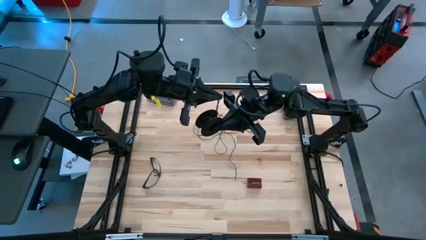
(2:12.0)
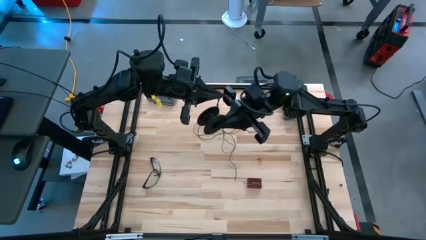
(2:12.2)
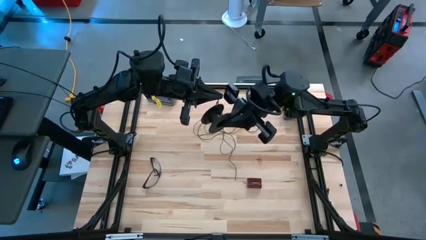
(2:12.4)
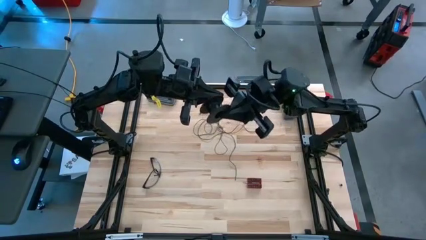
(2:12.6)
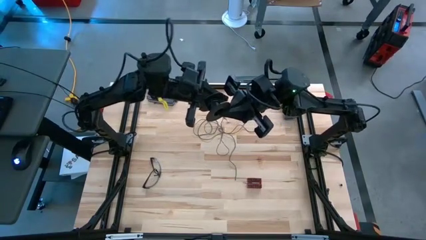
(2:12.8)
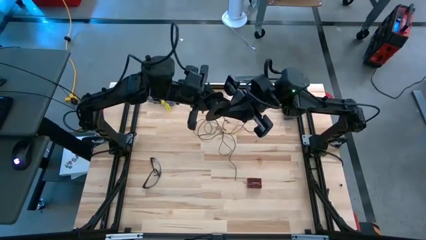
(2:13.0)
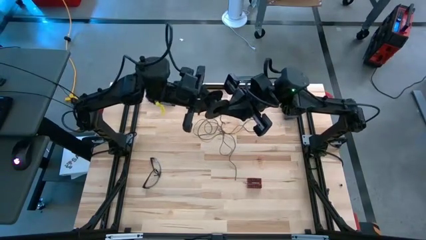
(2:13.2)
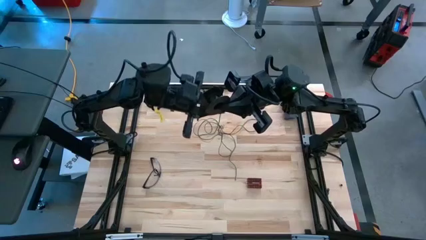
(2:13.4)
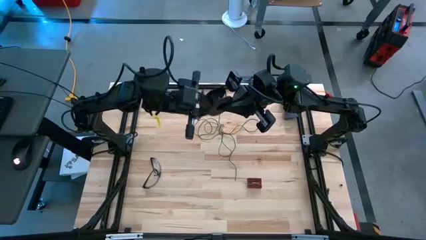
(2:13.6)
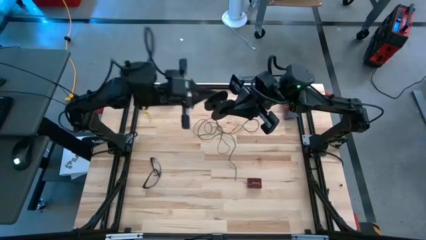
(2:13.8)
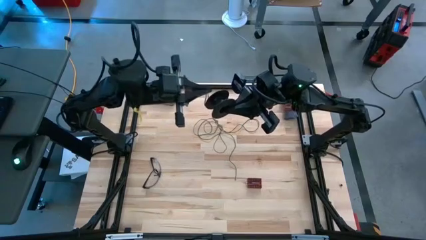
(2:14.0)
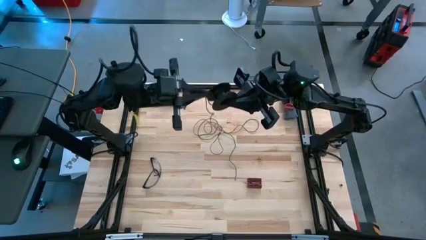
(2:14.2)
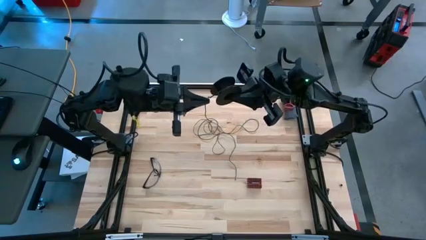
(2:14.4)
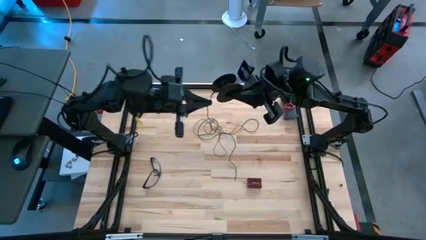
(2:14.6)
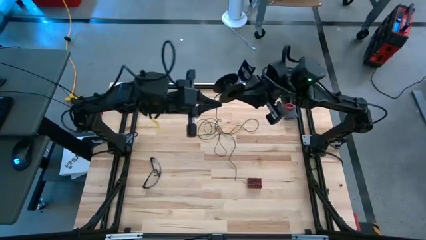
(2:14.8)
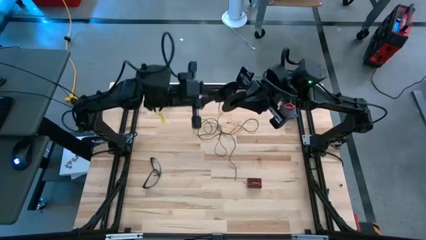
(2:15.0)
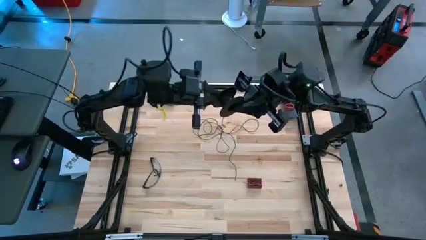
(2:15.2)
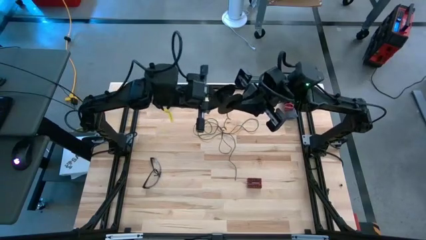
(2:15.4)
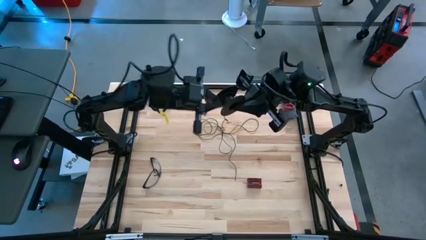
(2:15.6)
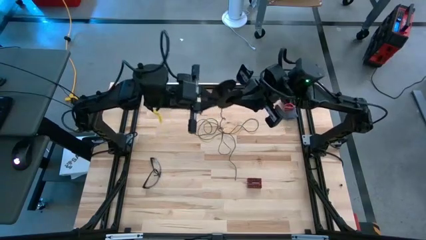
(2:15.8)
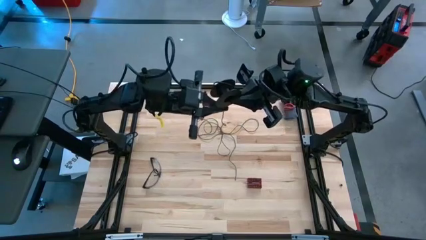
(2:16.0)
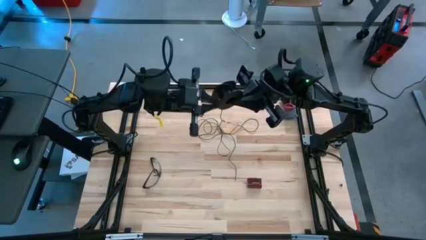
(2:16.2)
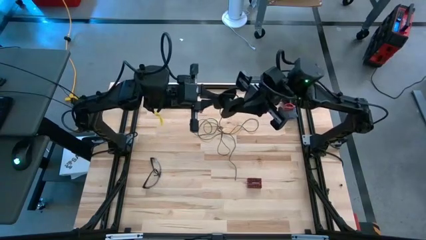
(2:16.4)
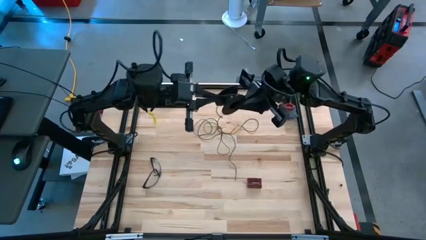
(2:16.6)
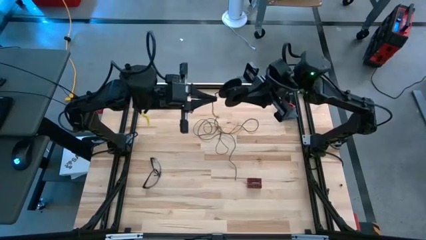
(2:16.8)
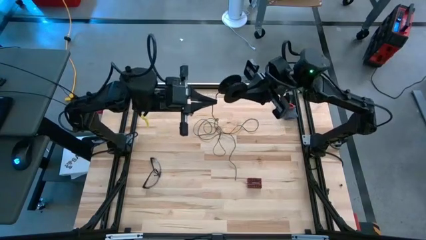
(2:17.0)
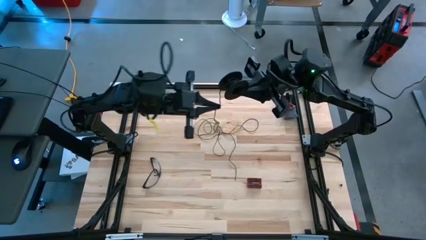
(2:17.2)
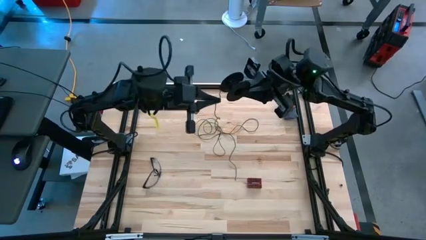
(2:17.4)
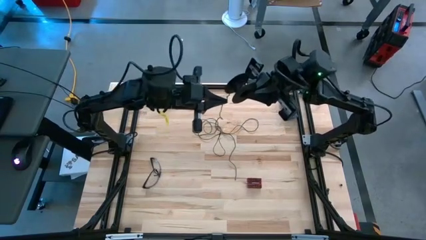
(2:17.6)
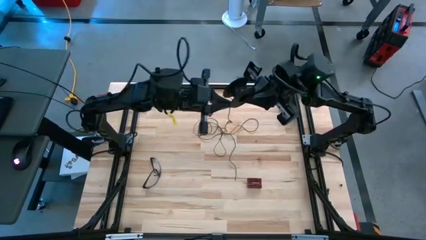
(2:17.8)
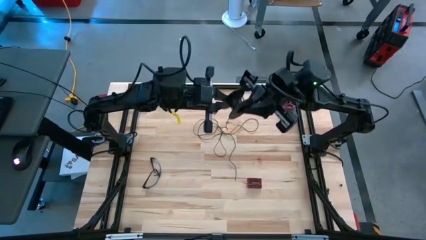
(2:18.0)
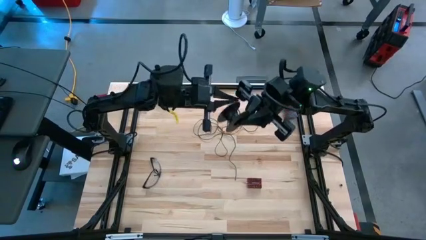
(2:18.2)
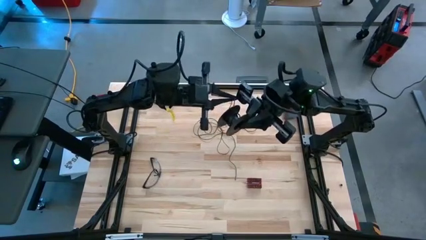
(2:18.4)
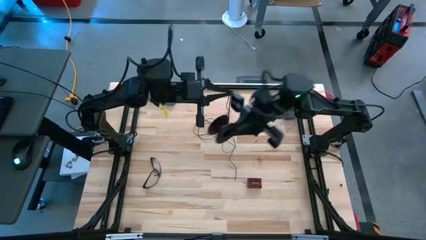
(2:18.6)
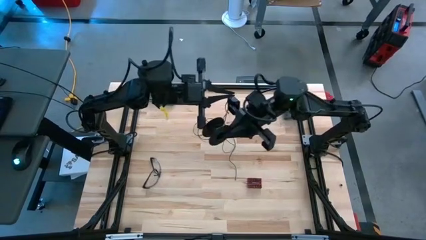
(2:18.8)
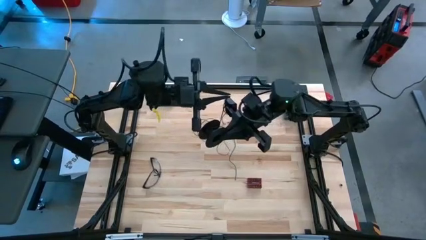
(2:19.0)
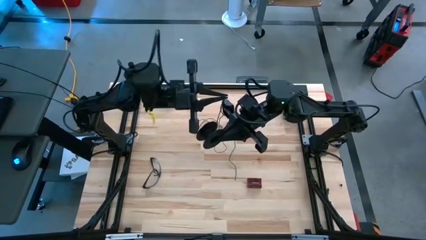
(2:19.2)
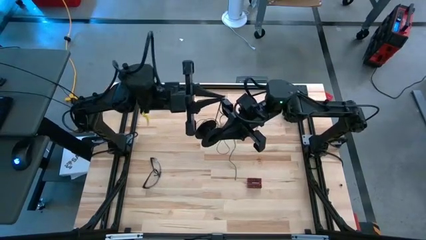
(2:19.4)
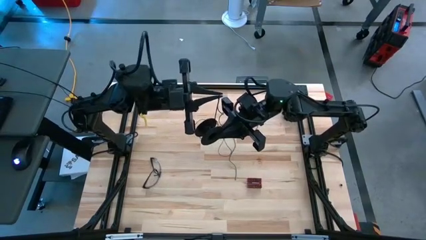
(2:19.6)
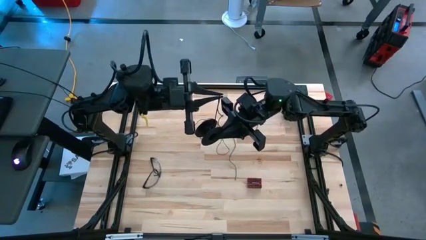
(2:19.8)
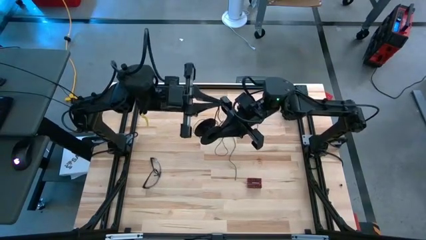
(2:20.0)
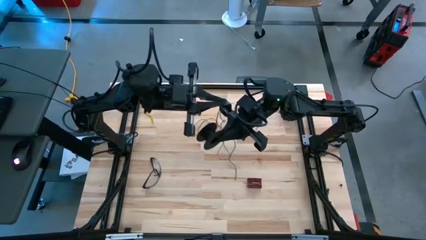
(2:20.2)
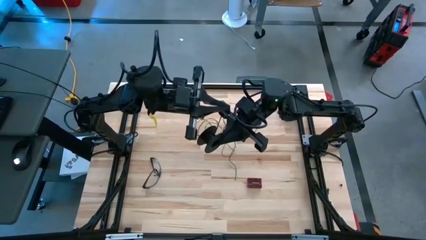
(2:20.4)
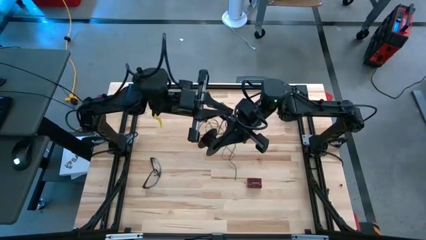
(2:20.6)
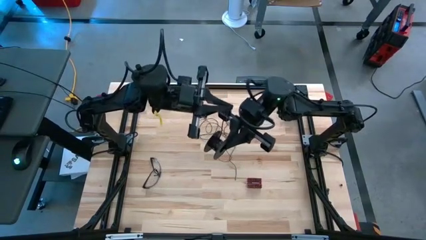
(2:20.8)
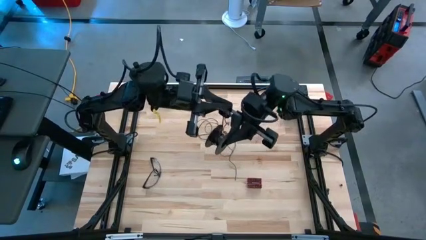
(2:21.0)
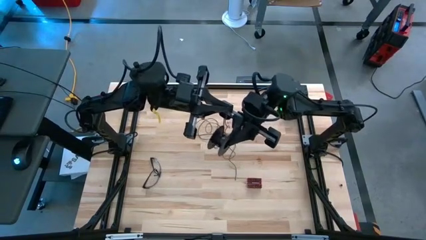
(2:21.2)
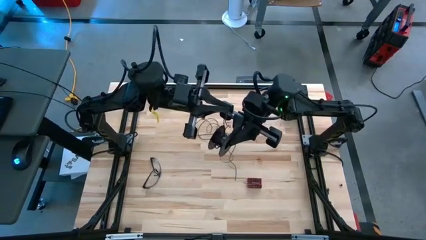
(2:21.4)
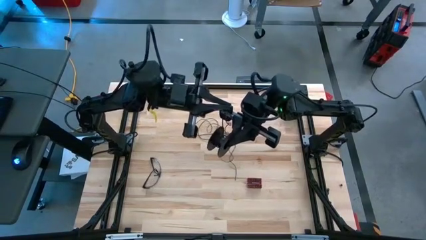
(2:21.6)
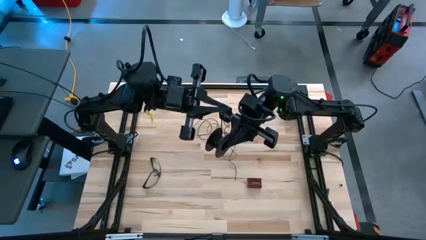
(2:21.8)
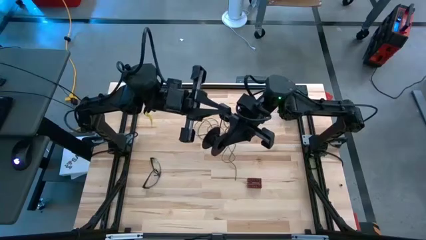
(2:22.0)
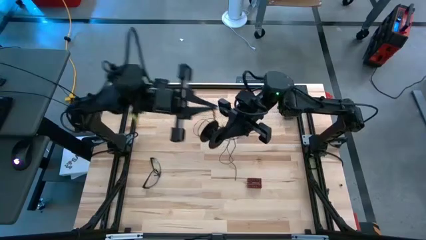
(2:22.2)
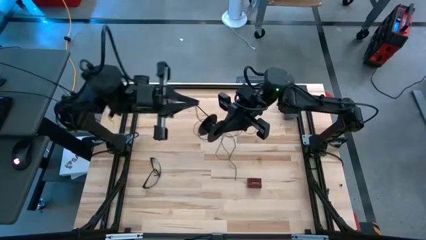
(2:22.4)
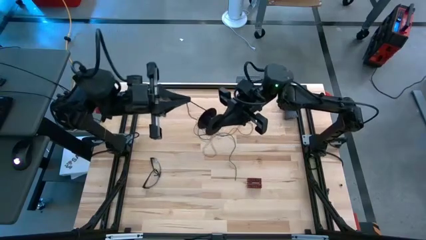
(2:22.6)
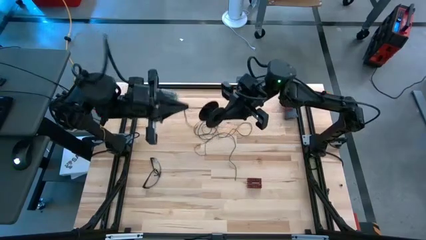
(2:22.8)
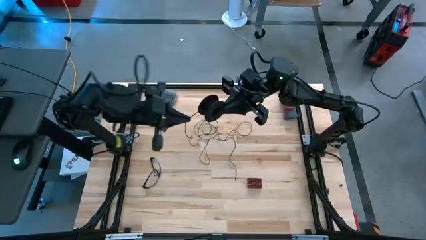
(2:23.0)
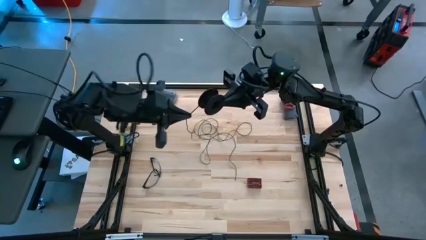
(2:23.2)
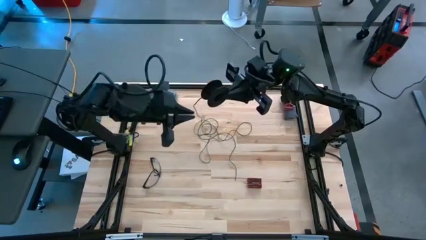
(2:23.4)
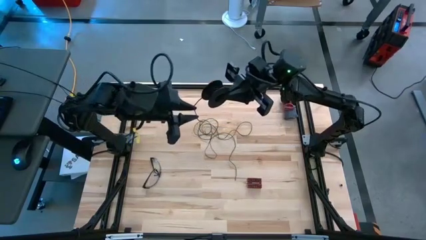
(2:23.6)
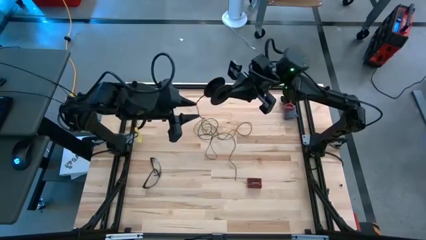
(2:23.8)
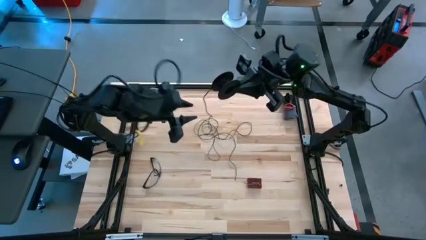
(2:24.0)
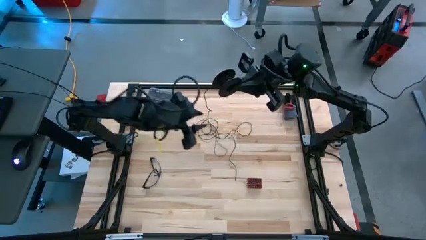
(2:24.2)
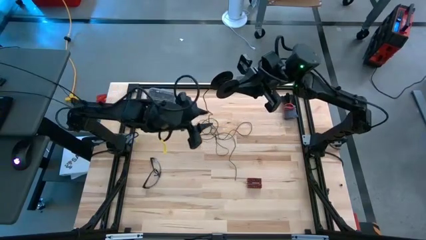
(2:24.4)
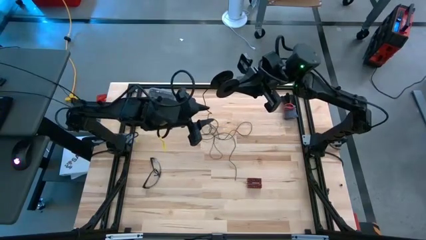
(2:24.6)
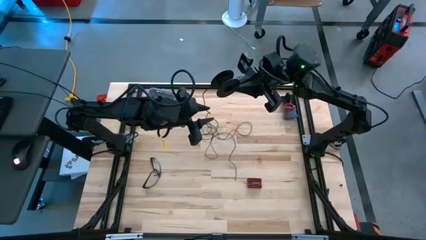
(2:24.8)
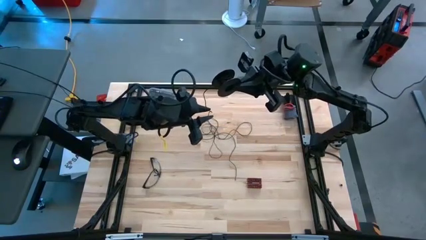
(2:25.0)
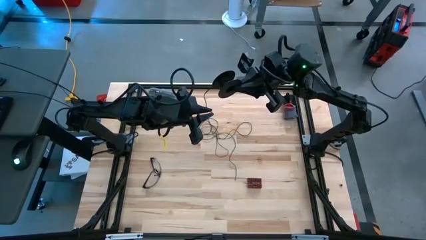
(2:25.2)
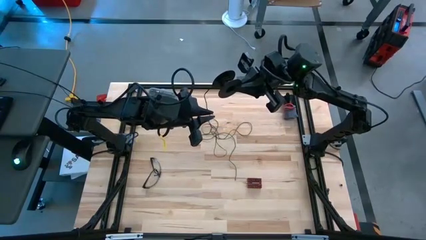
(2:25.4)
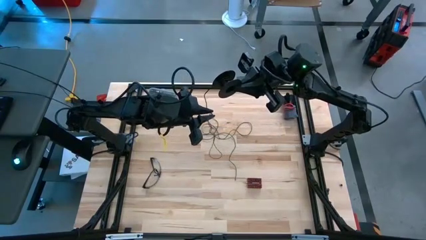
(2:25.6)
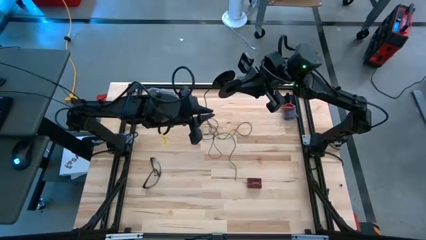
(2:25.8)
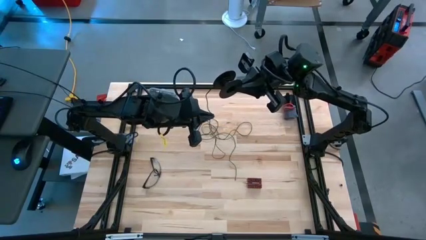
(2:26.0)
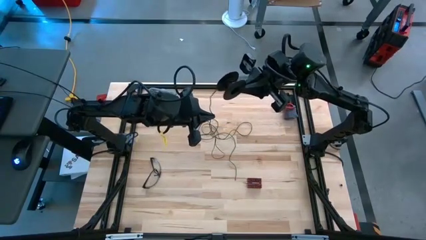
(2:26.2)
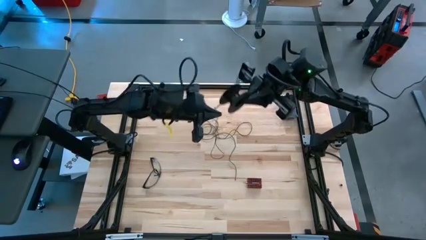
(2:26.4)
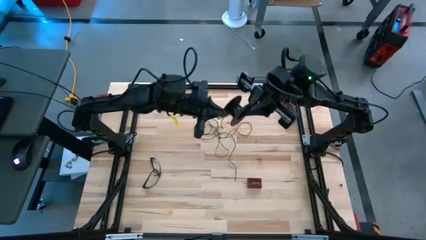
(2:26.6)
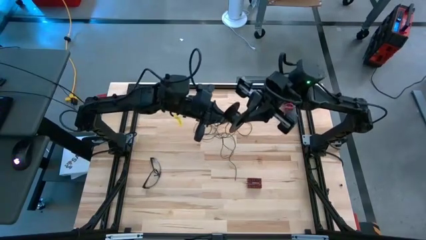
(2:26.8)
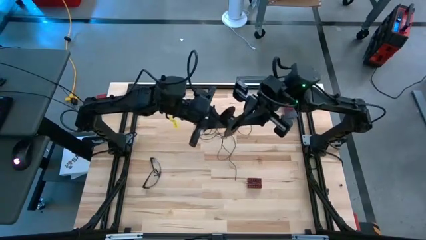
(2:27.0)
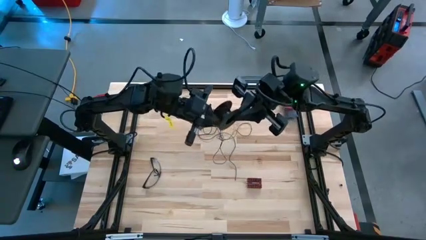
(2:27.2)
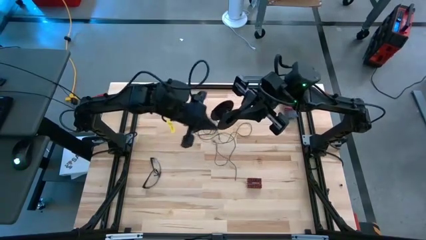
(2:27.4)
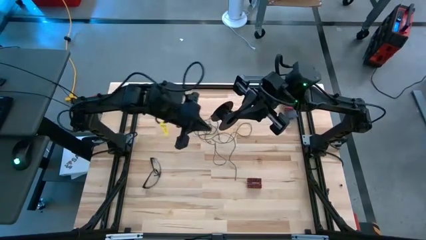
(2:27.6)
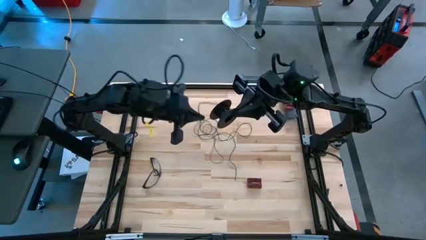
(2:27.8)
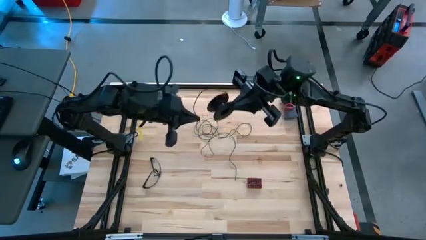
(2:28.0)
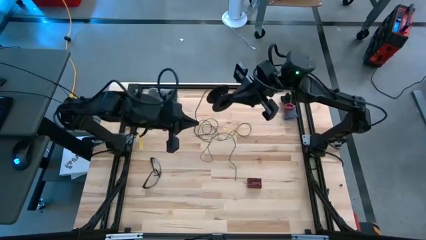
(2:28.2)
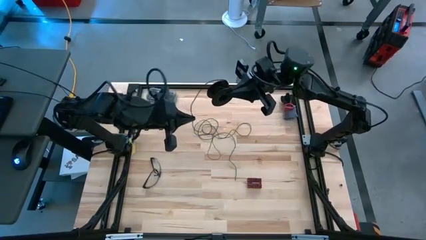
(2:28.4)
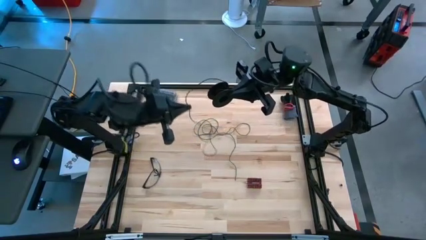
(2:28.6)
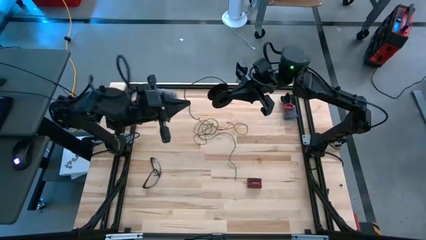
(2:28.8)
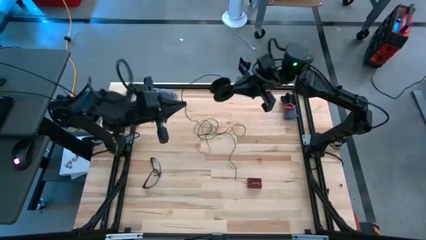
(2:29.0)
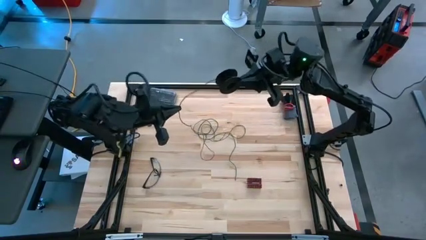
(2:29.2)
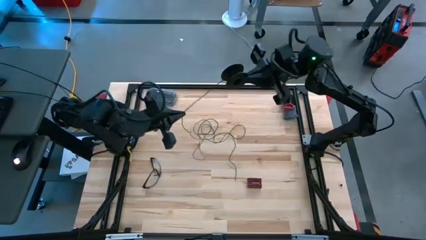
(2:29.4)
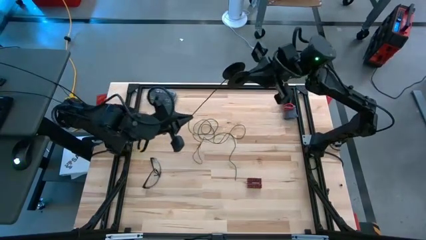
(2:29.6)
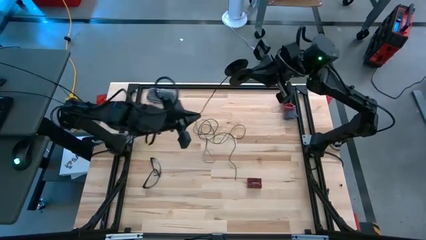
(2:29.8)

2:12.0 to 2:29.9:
Task: Coil cords
Coil the black wire into the spool
